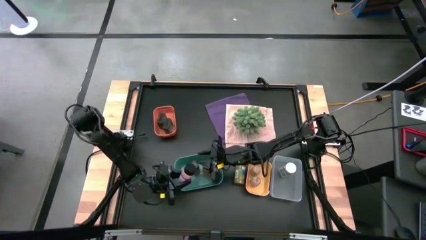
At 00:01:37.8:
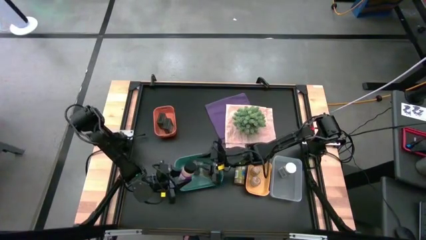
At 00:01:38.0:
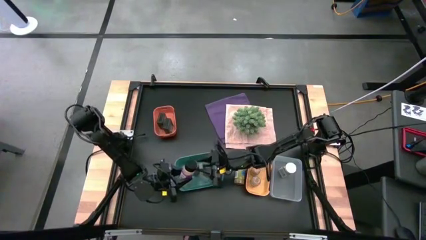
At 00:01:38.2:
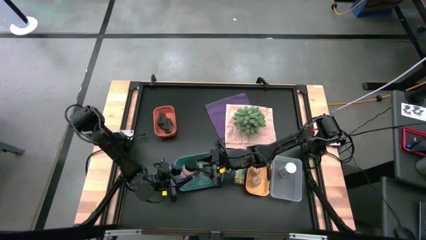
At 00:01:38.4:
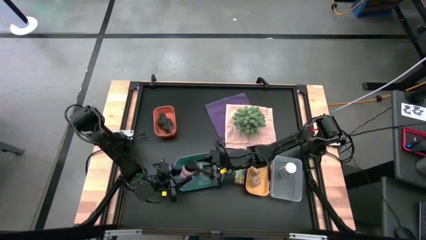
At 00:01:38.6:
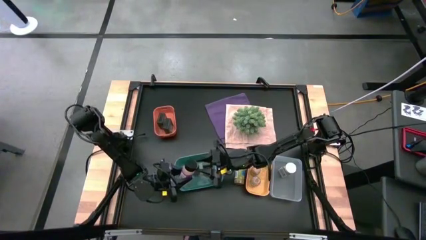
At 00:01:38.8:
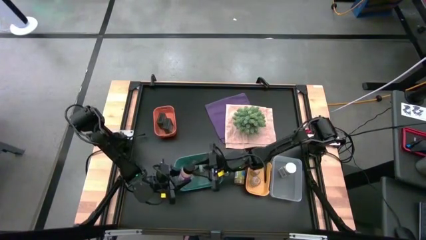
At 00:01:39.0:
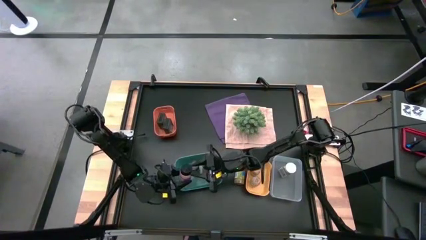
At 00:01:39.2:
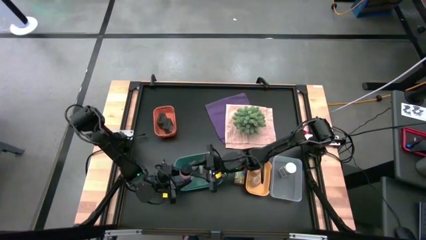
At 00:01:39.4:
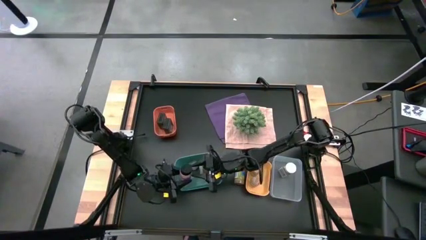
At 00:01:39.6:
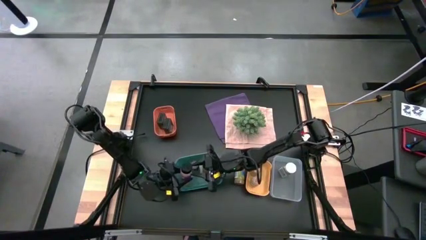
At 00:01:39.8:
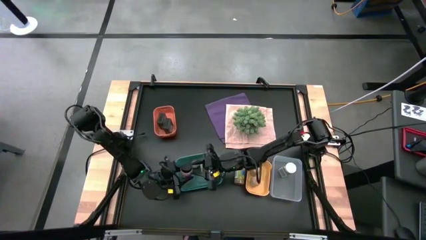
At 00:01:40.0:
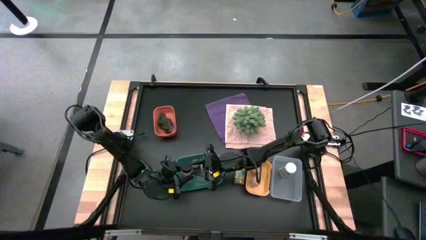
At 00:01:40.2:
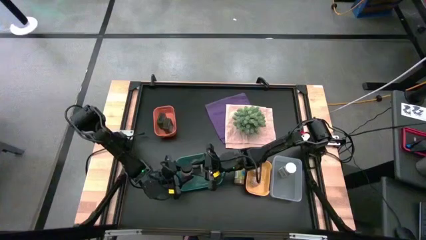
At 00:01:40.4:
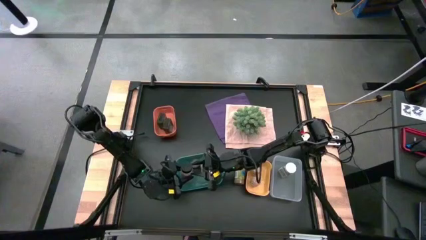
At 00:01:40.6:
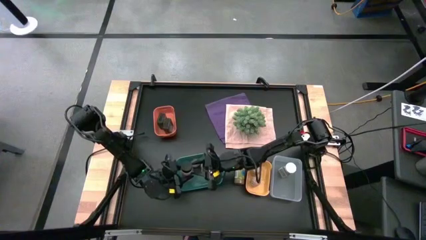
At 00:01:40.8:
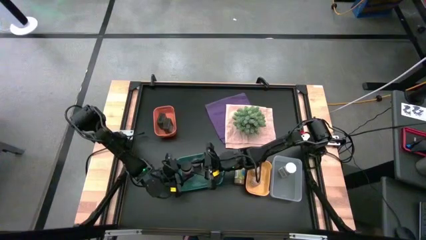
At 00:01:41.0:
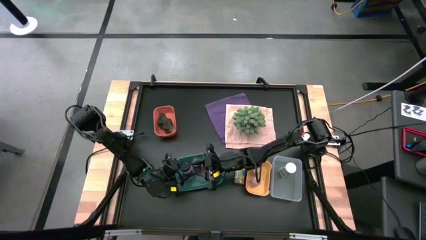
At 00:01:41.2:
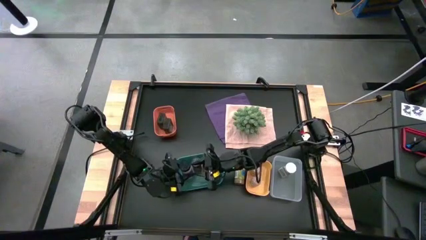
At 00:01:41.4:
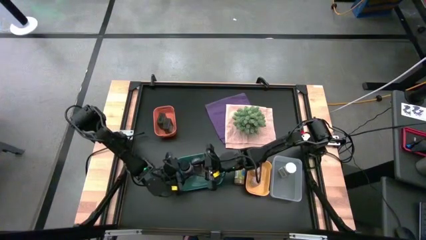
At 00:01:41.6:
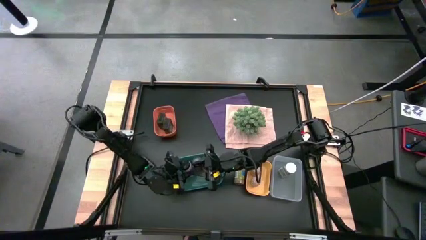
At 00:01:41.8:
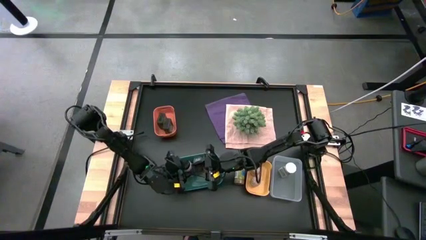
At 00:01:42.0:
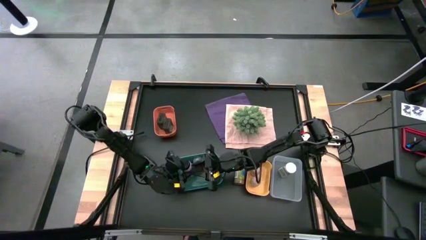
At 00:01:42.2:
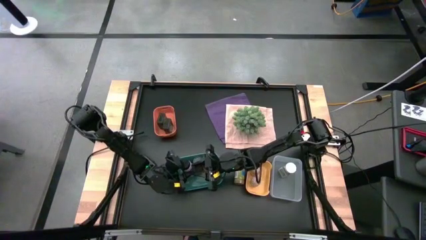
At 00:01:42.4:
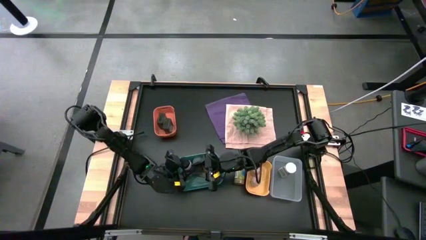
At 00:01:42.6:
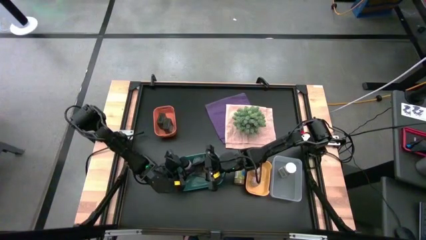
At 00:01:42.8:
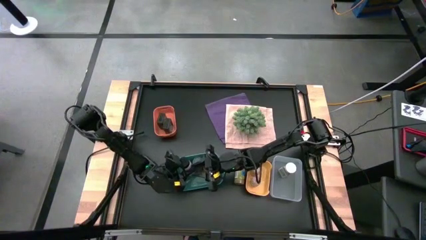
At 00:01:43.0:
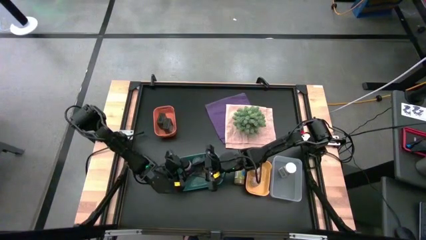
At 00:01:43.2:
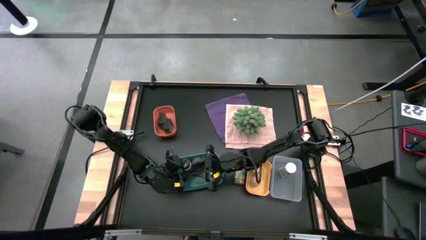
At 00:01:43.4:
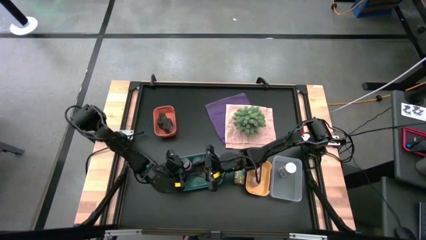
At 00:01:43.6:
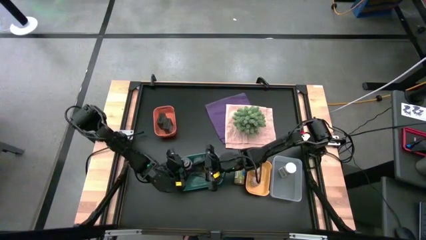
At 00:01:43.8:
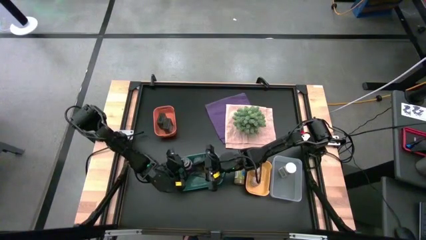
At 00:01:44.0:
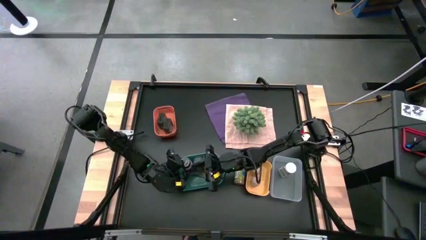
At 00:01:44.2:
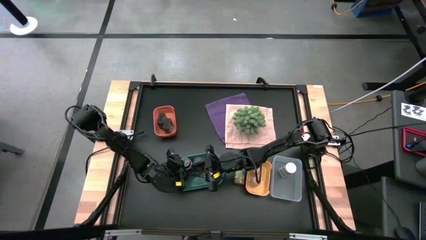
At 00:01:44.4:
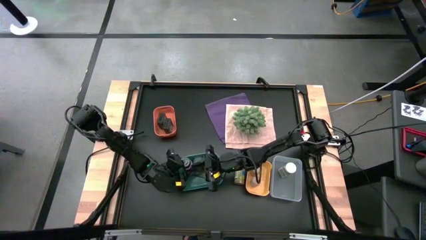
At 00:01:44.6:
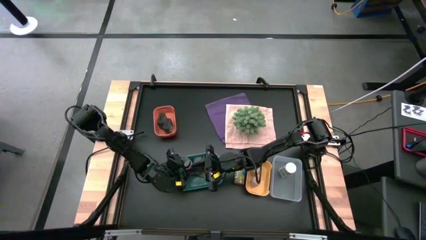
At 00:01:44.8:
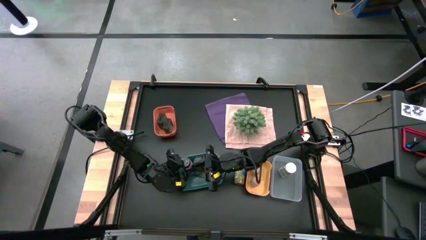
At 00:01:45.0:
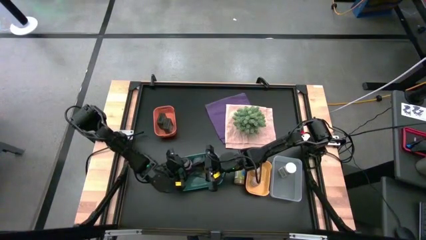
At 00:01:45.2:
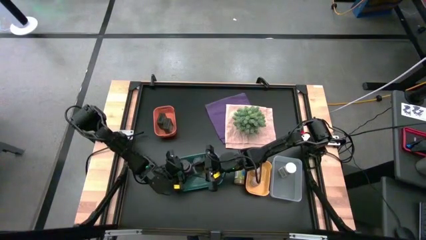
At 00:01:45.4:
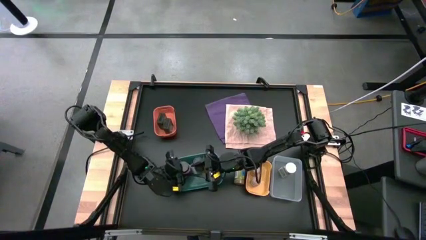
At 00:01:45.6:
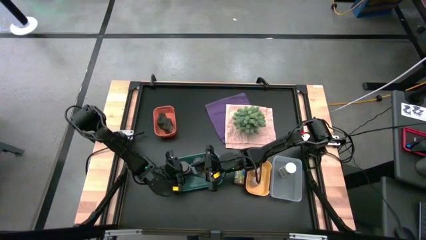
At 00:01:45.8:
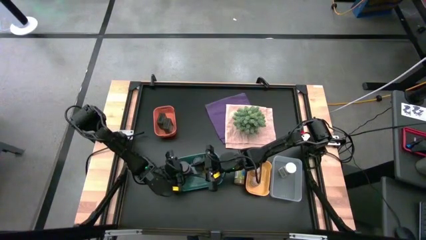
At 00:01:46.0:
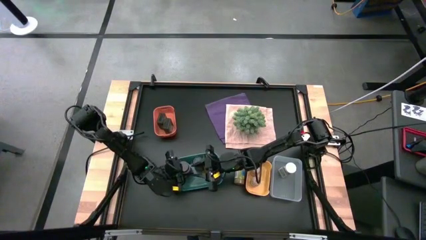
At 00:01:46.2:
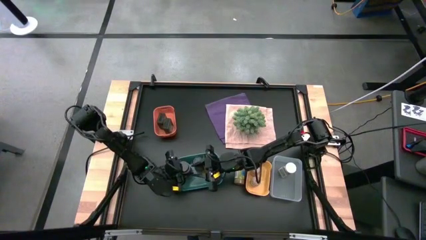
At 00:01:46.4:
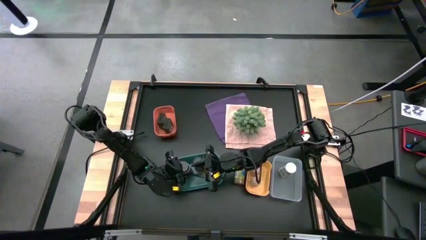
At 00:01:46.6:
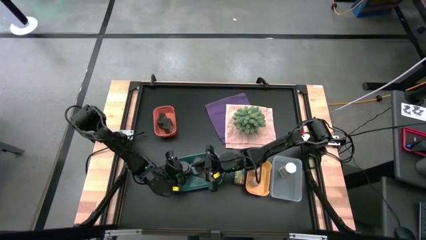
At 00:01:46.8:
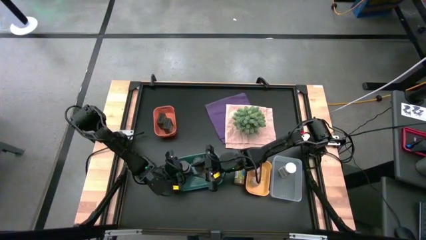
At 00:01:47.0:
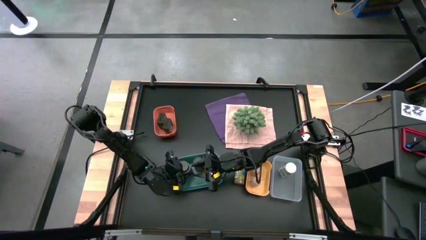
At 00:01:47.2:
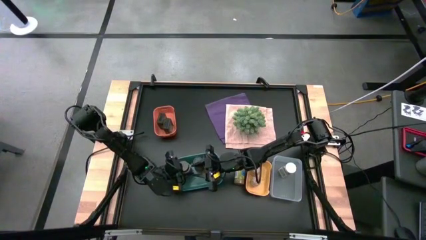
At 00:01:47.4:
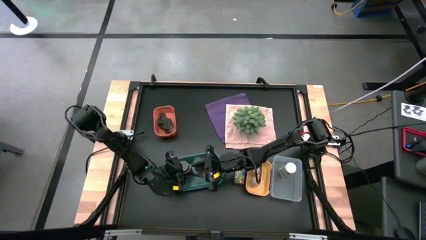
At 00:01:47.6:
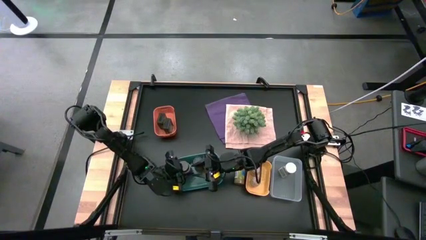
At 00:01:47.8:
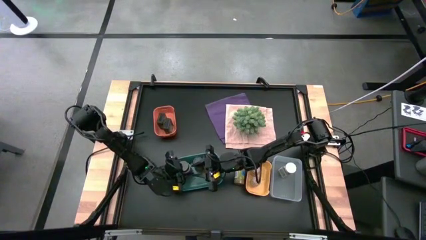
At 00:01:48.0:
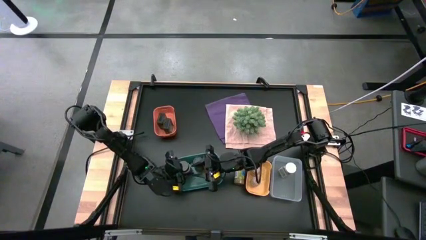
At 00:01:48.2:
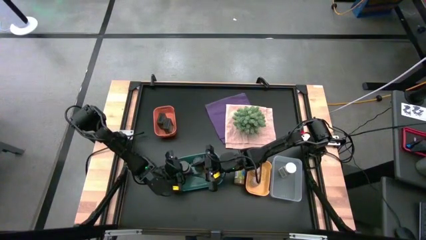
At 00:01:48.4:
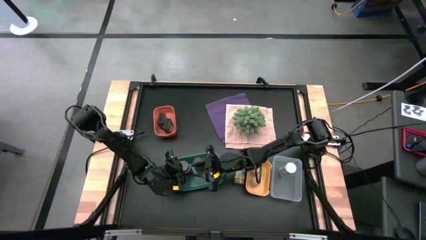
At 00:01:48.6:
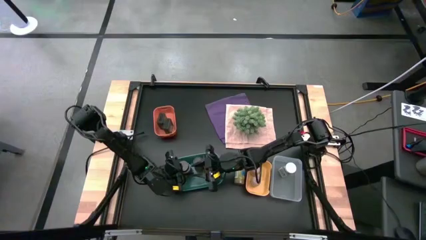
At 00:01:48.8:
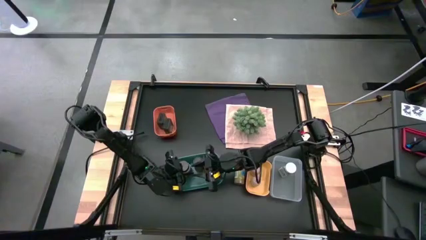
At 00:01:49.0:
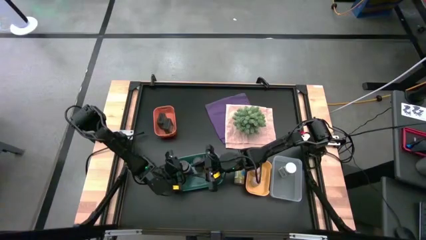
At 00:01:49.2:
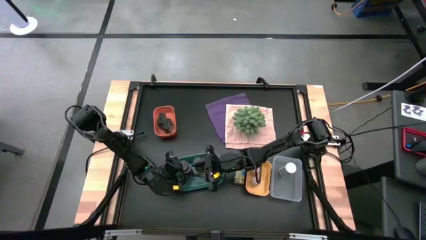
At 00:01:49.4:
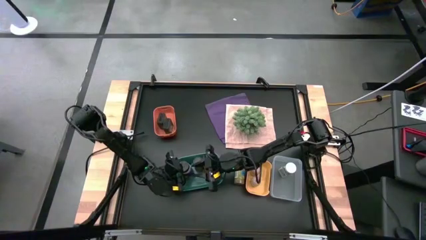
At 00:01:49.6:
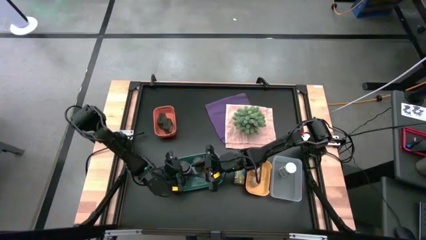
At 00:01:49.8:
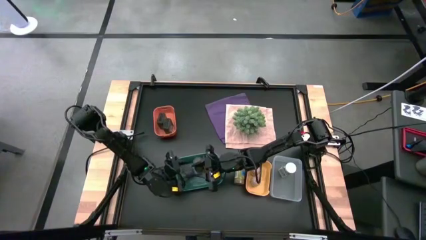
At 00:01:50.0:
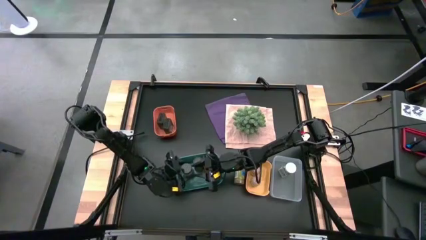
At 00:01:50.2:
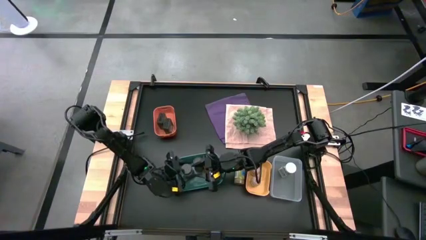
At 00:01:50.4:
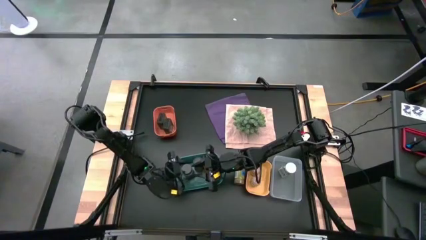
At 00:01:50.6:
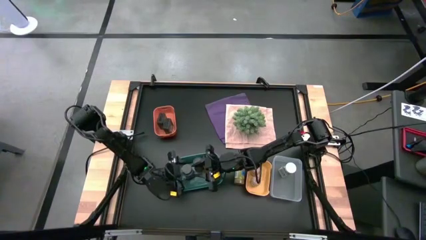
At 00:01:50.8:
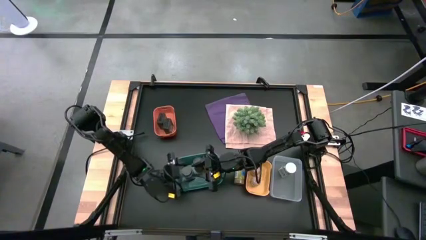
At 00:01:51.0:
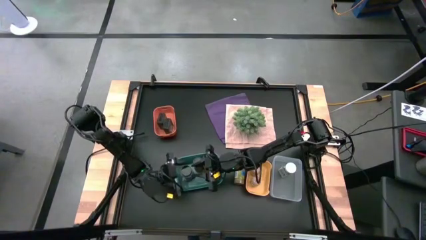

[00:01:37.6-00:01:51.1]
Task: Sort spices by type
Put the purple seasoning bottle into the blue bin

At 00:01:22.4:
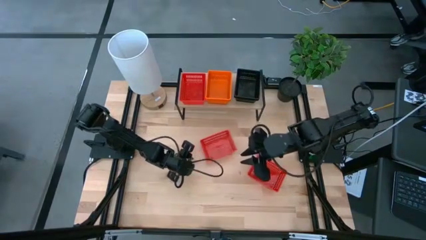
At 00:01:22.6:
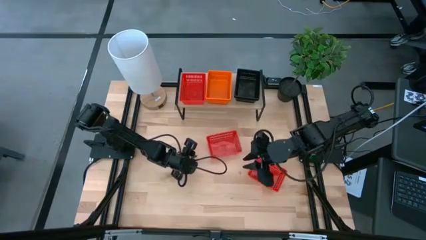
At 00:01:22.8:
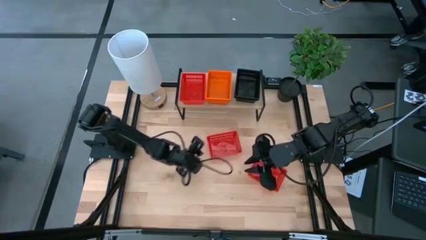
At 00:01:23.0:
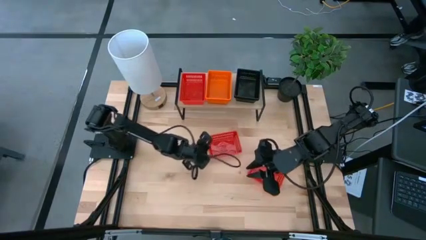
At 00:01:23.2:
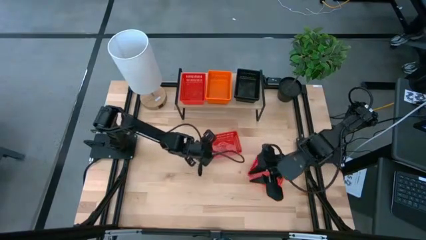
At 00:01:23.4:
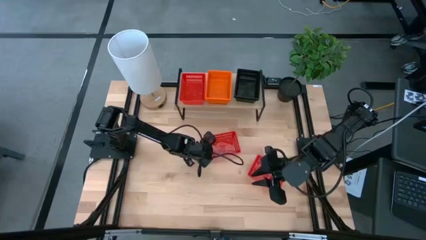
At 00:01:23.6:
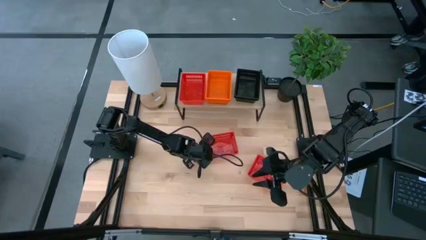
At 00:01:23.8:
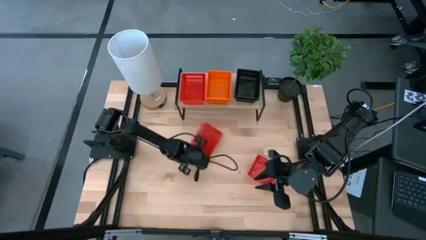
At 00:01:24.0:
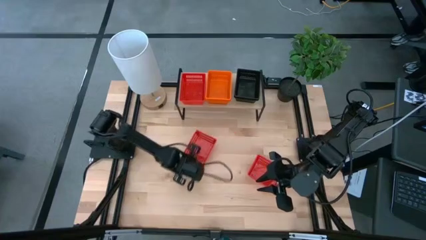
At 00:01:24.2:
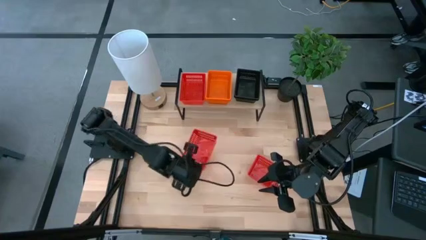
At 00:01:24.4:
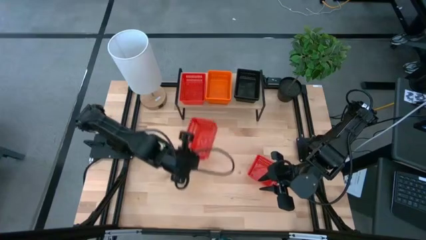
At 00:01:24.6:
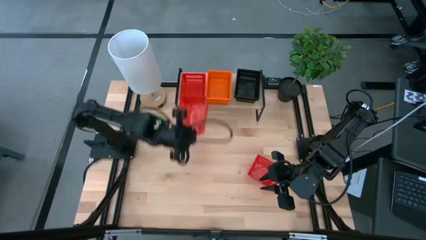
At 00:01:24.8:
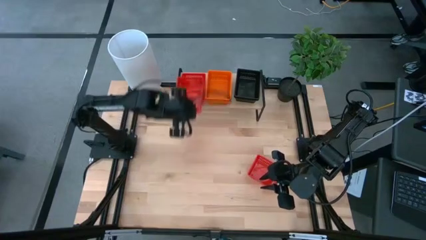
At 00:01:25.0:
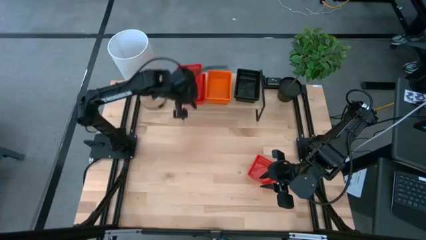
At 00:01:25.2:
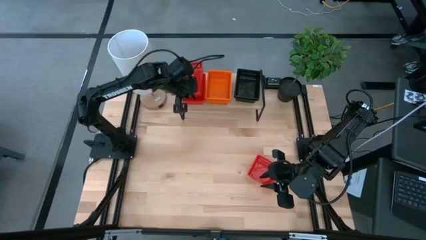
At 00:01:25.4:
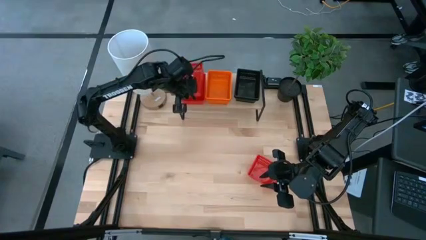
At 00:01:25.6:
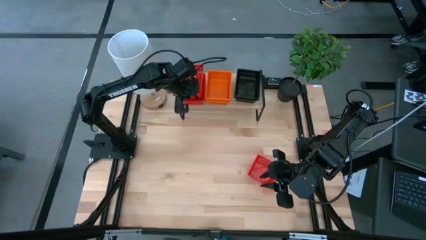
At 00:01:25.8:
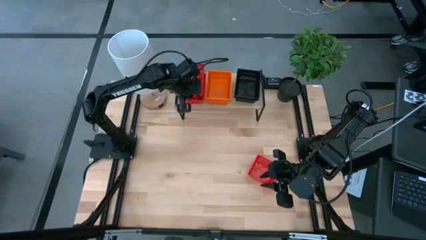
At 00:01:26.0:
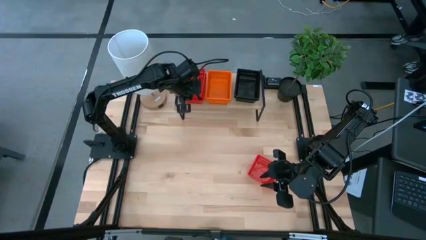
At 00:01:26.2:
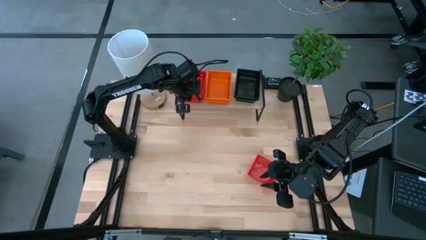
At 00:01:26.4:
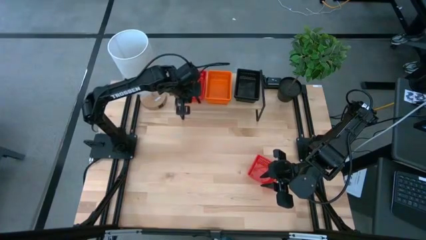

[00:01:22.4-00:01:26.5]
Task: Stack baskets on shelf by color
Stack the top red basket on the red basket on the shelf
